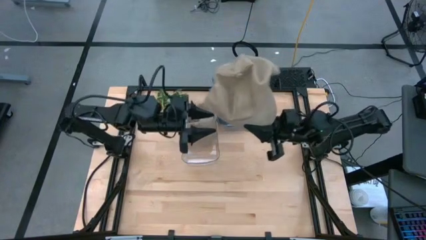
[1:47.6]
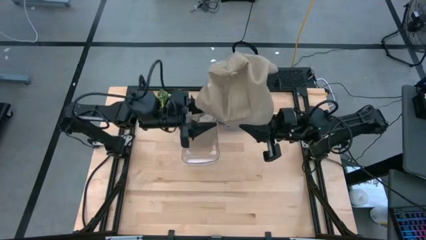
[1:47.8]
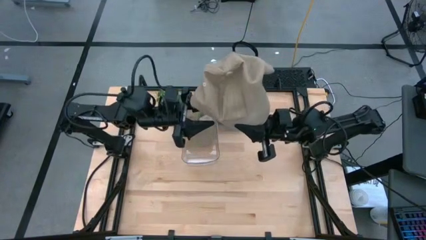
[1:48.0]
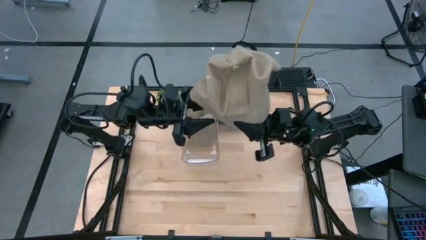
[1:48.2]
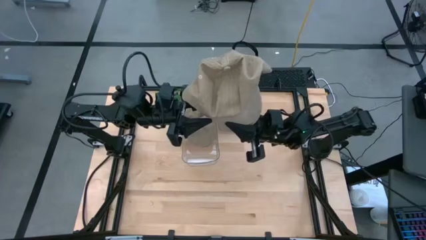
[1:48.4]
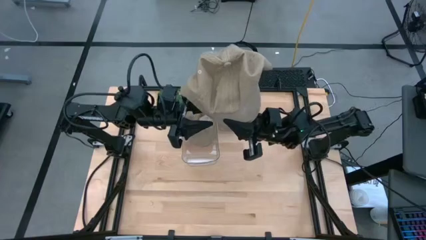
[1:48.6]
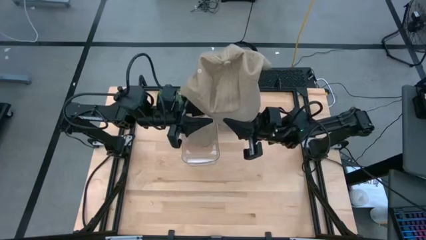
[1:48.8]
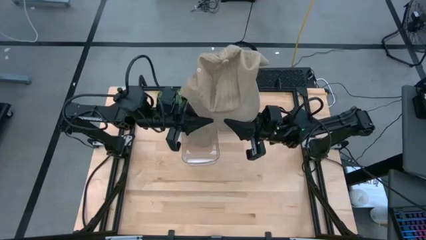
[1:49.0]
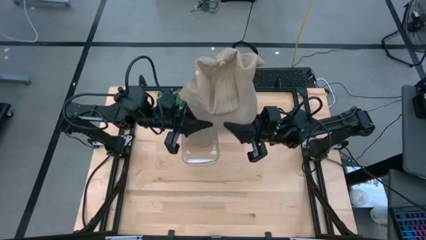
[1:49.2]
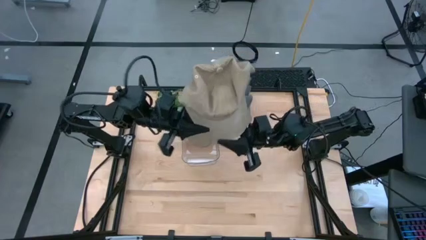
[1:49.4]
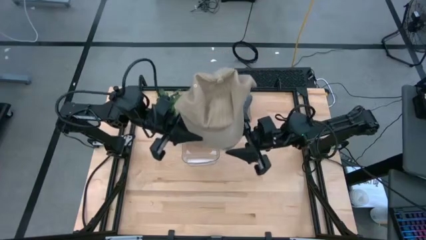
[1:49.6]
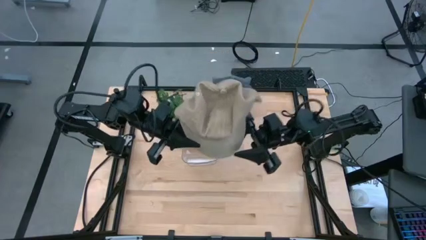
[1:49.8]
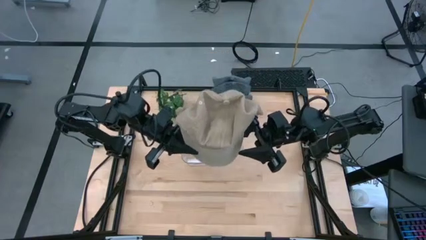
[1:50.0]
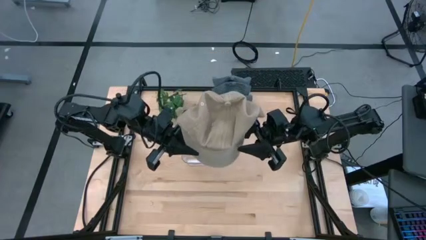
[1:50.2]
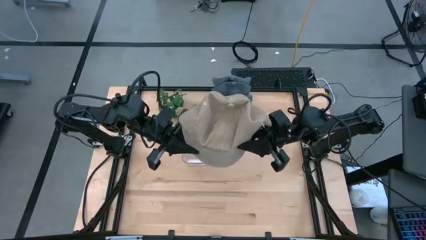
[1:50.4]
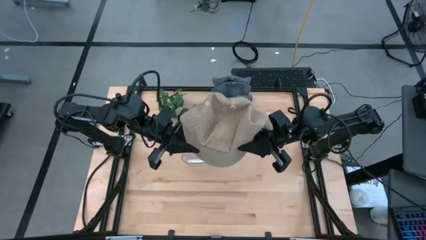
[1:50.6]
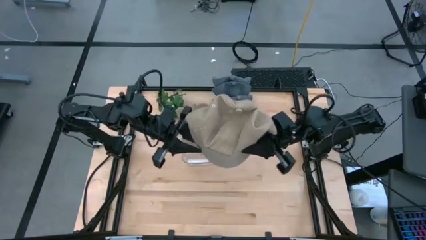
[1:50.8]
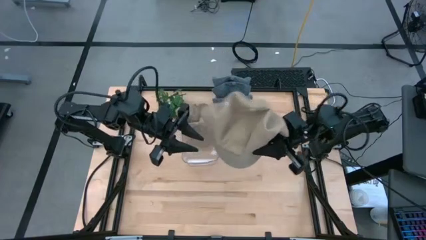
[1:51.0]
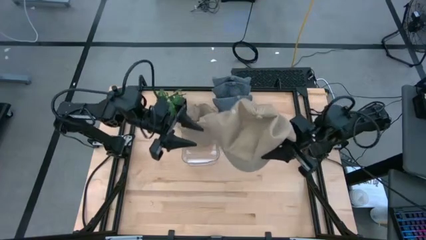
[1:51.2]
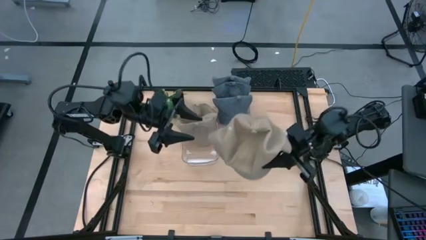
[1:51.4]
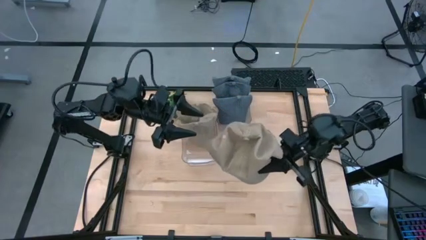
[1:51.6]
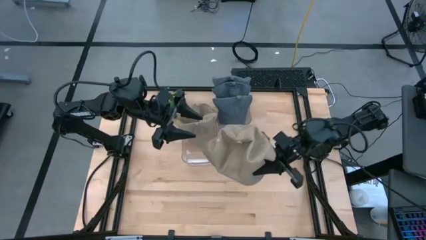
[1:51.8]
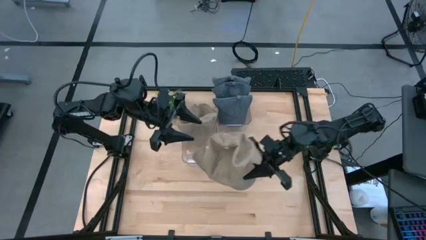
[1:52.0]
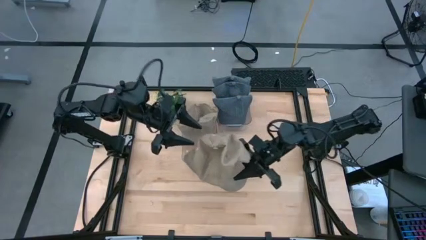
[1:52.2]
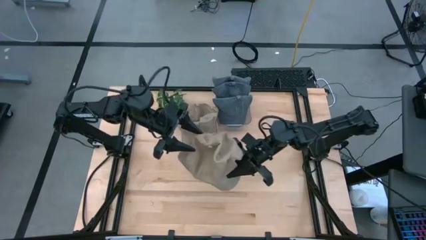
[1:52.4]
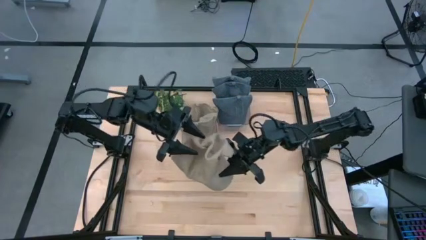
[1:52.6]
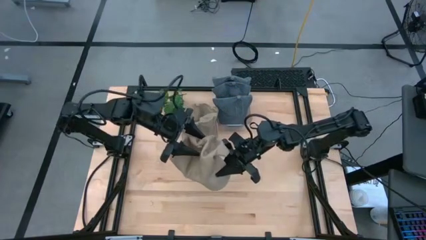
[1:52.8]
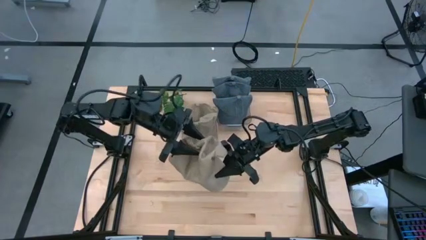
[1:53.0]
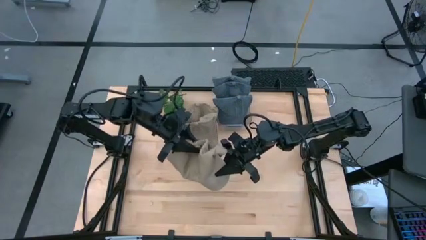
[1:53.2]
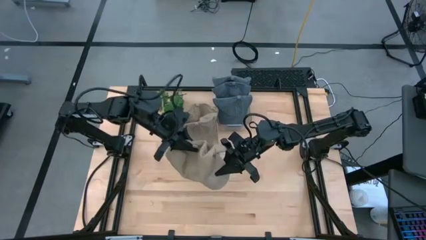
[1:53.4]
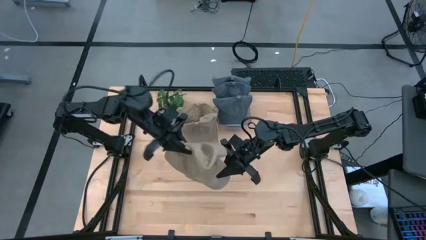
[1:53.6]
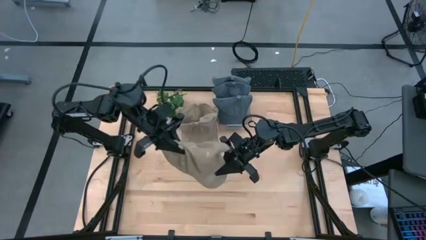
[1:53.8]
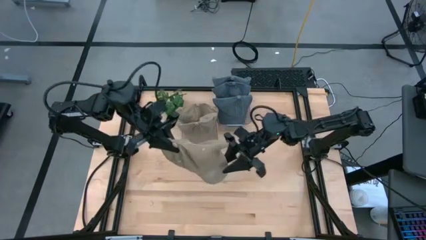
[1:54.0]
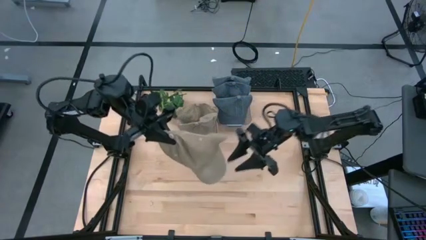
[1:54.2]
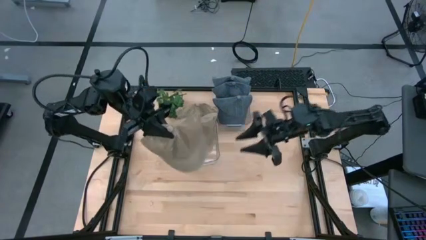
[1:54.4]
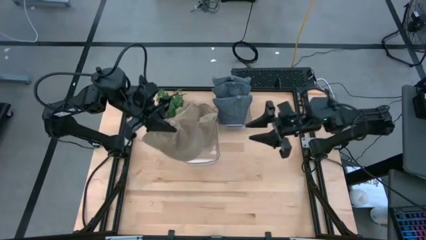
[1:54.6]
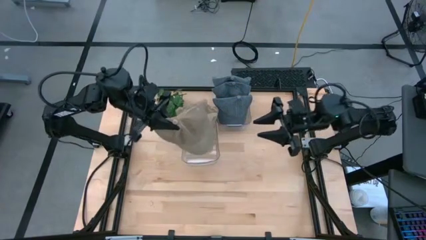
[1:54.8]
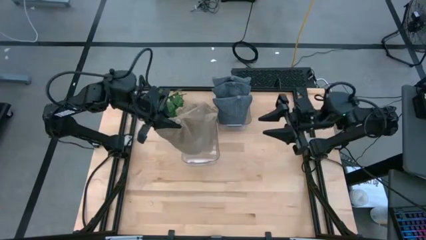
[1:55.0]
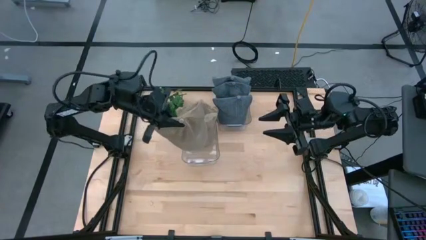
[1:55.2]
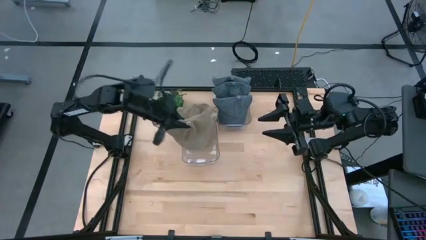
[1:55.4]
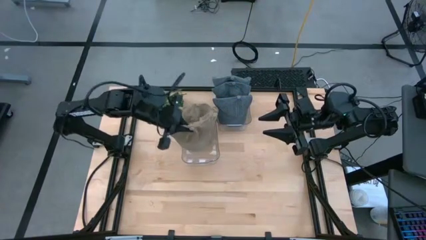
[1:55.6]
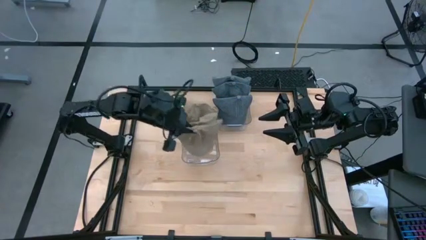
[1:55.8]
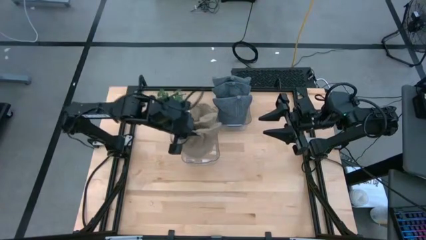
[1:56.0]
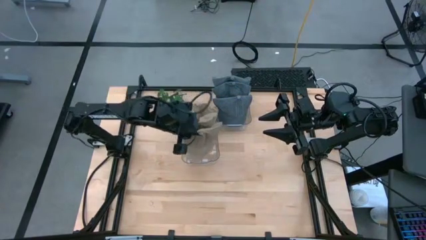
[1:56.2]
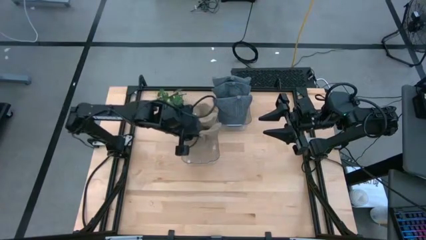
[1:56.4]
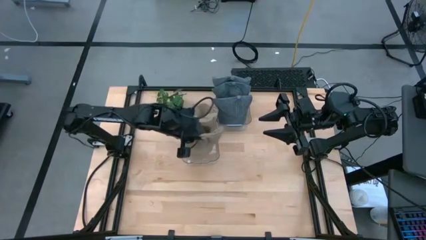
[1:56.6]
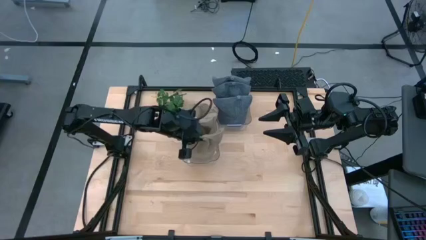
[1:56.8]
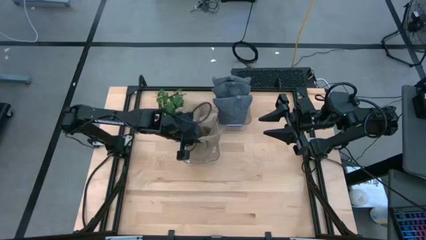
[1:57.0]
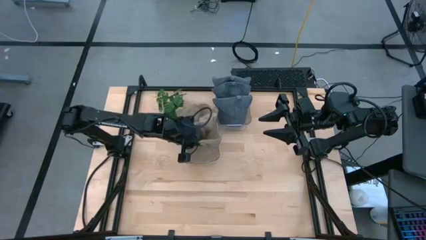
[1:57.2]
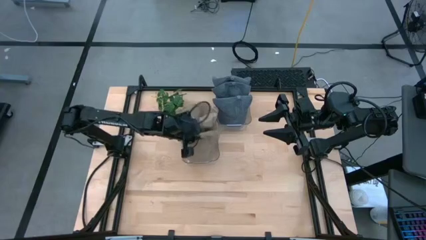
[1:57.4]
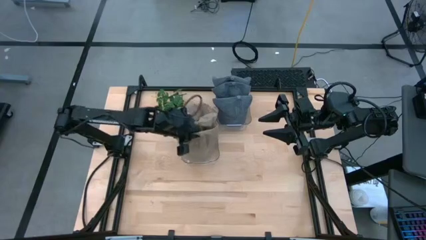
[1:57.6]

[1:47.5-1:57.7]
Task: Pick & Place hat
Put the brown cap into the left transparent bin

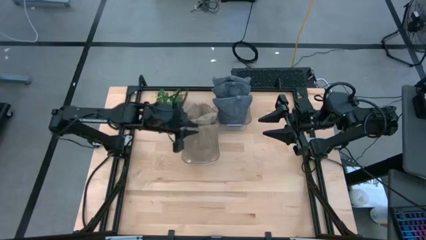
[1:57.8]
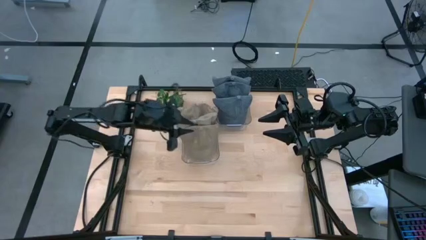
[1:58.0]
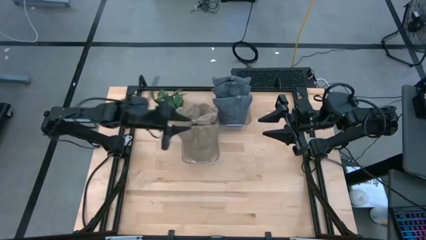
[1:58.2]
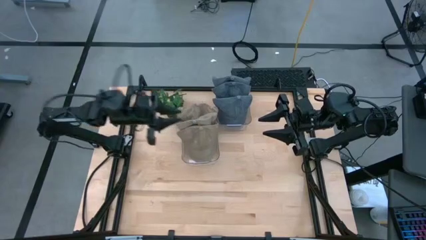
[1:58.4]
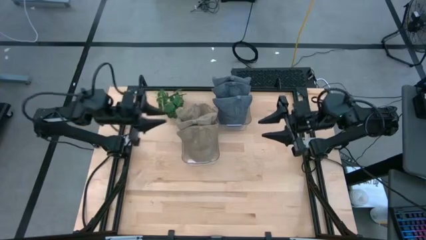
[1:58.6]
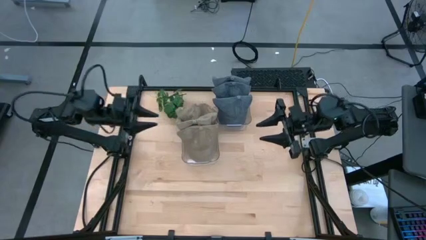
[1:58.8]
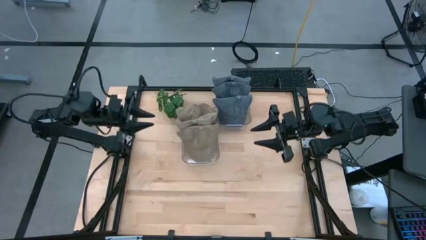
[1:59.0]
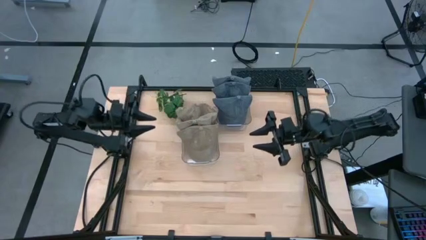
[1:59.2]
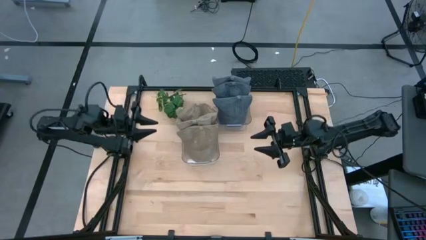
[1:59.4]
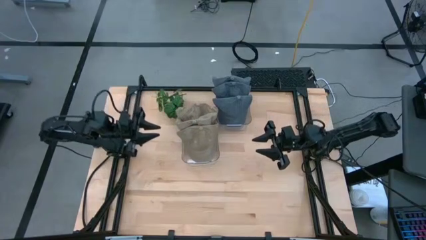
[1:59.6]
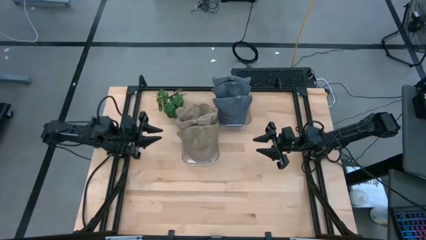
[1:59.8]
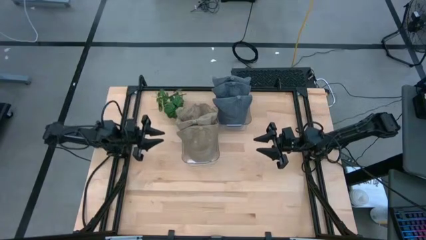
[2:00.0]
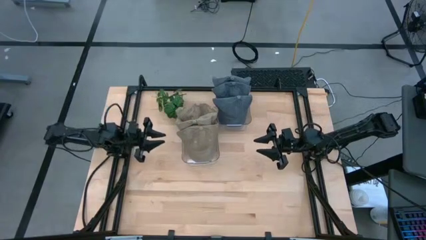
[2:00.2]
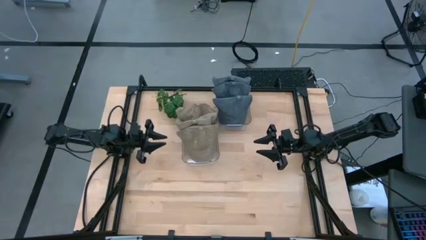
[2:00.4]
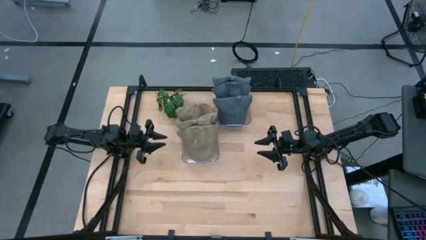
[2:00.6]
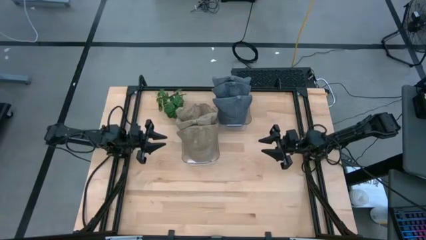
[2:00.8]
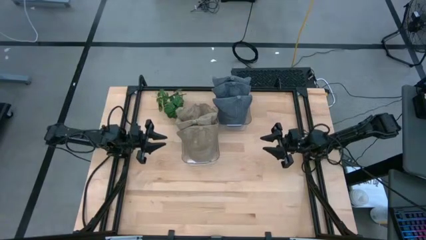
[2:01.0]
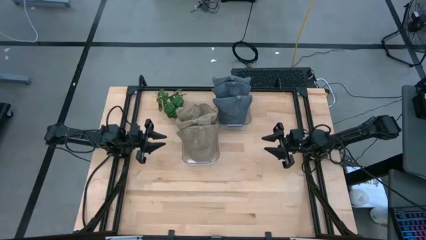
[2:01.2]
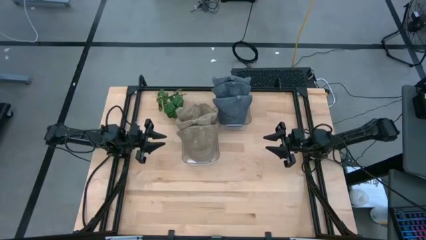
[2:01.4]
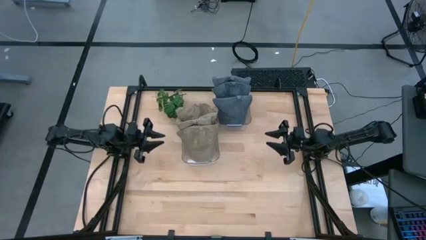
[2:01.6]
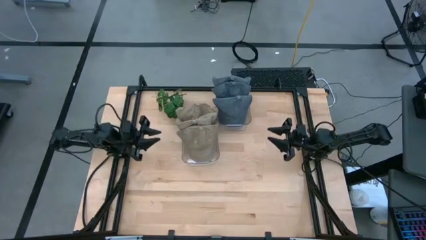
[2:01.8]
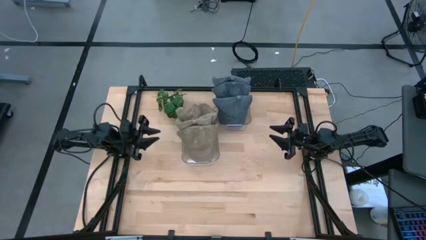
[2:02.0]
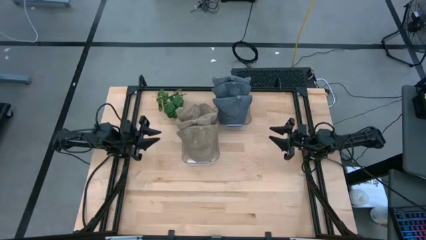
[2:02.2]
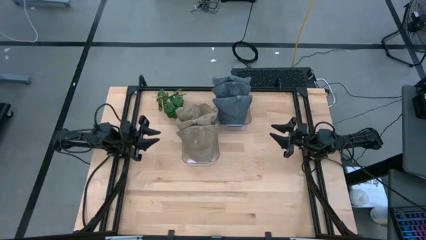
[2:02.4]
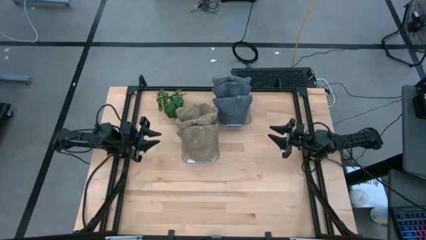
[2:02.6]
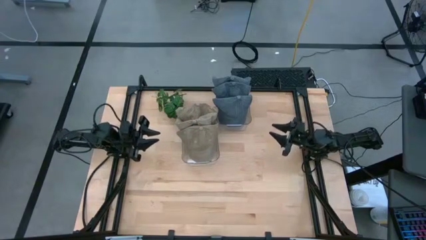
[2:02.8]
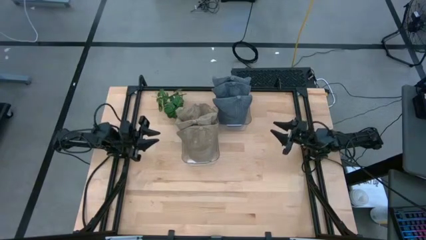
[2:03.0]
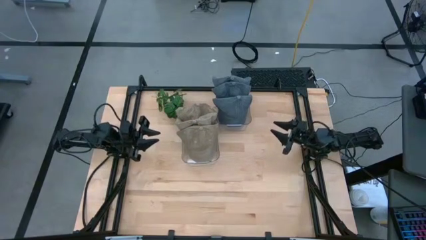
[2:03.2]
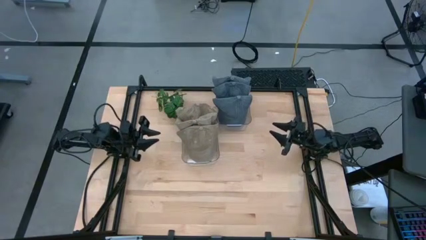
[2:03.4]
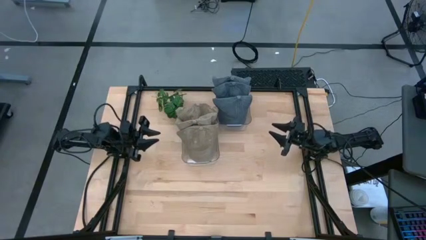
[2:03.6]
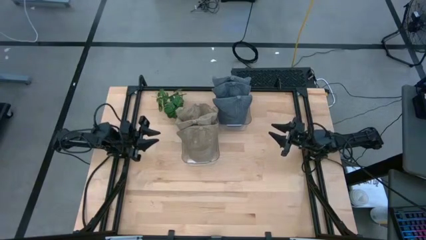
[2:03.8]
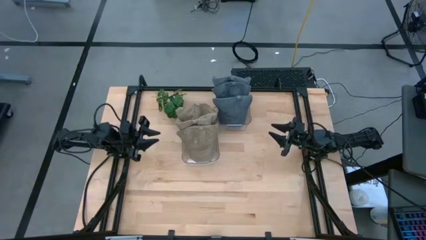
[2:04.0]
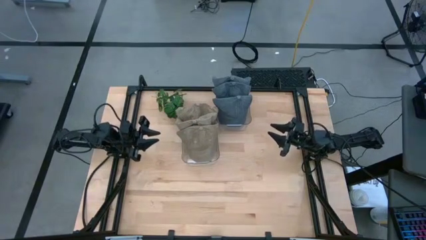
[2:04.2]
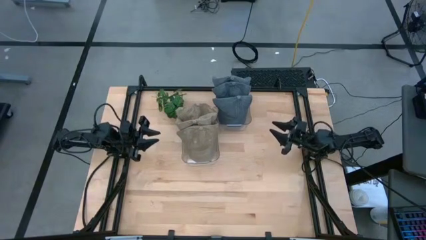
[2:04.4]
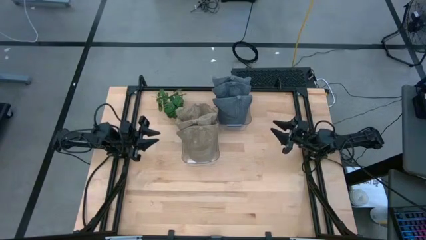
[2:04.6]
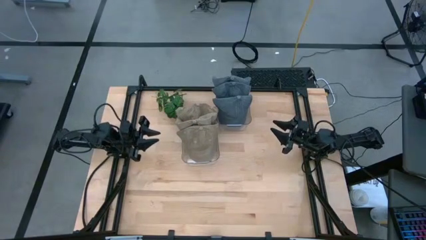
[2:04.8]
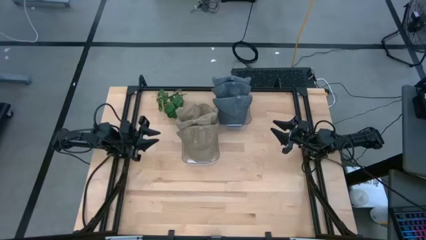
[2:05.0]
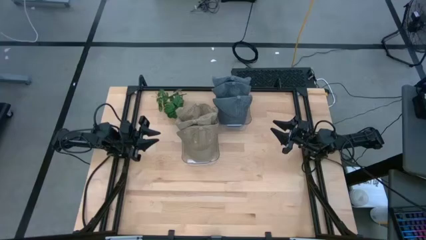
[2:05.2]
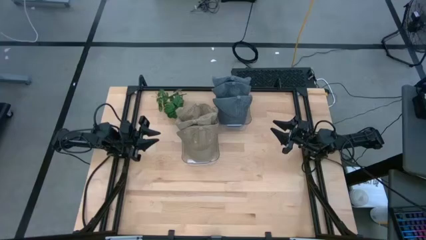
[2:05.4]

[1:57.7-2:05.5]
Return to Home Position
